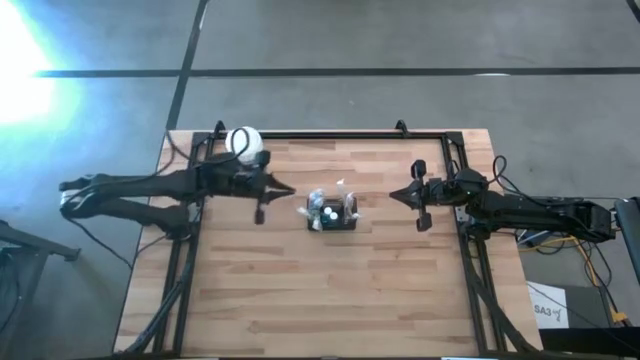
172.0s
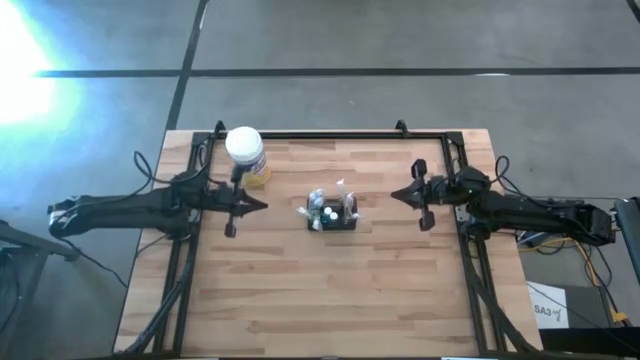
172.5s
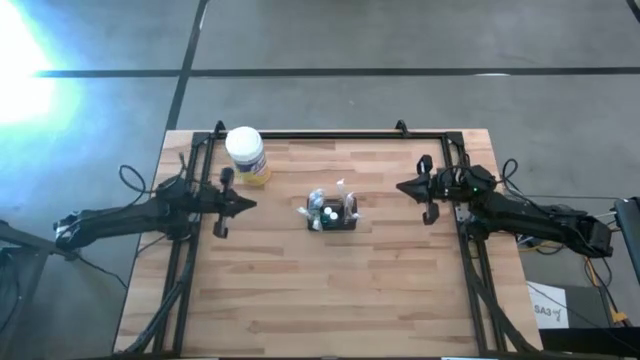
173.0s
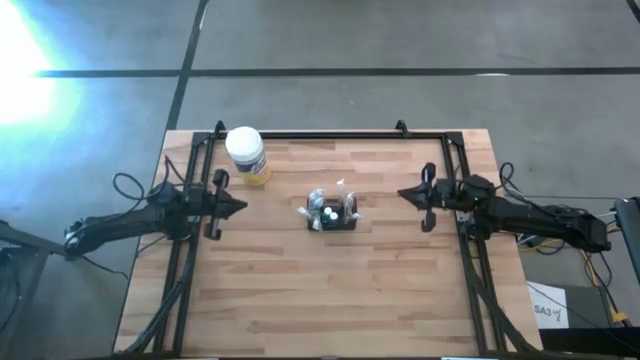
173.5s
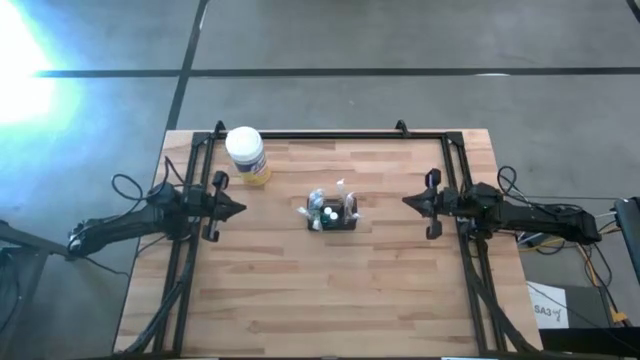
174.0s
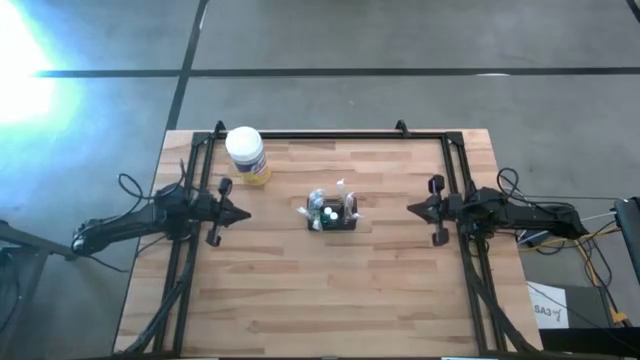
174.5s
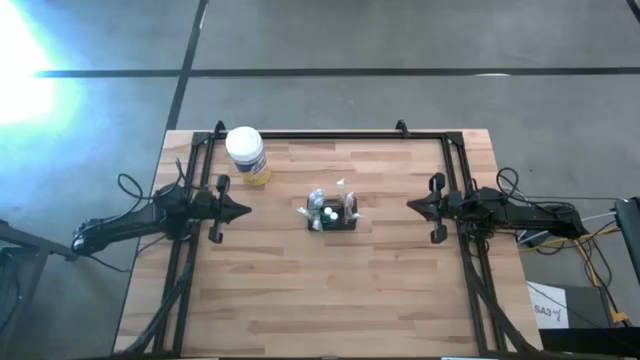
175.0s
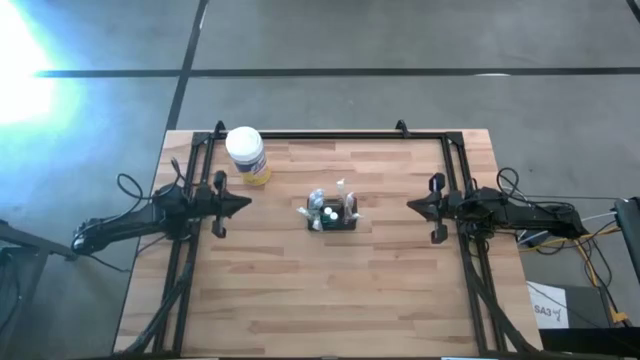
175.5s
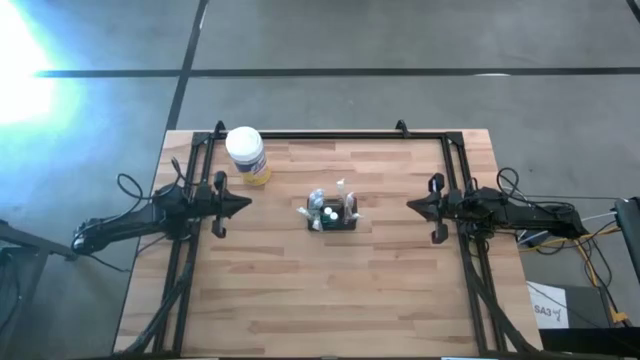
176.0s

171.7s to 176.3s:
Task: Pick & Place toothbrushing station
Return to Home Position

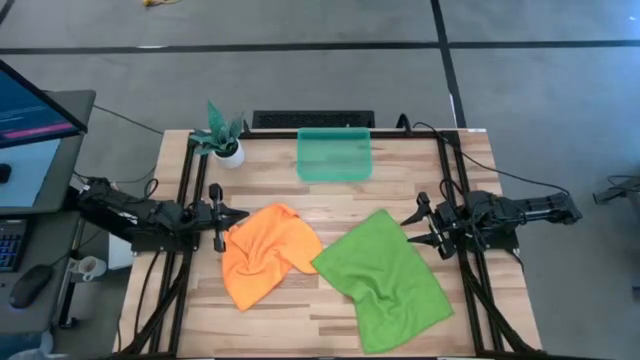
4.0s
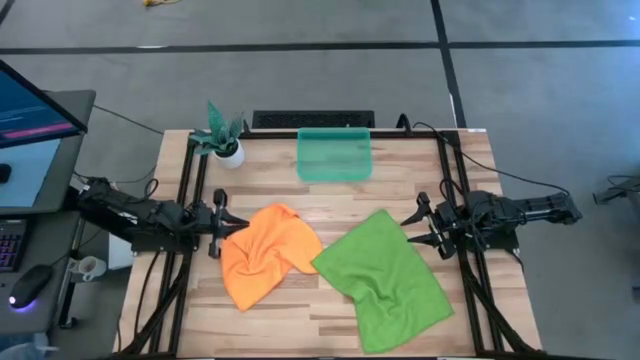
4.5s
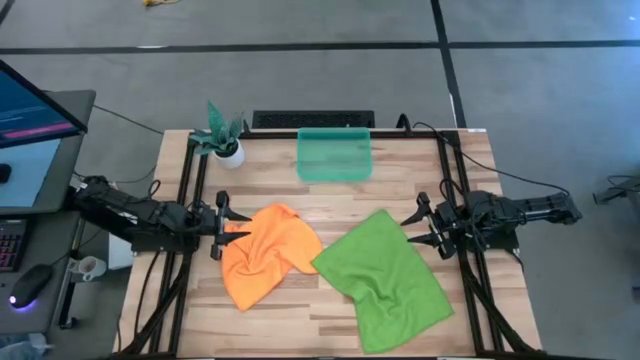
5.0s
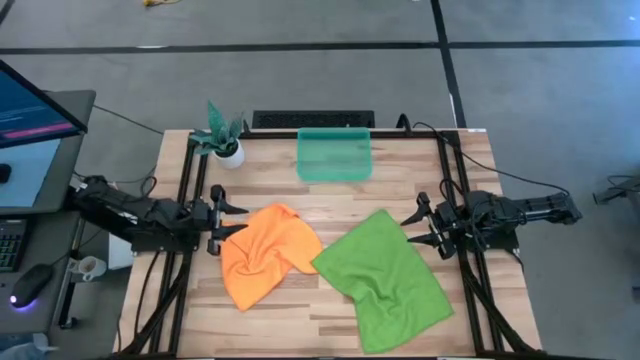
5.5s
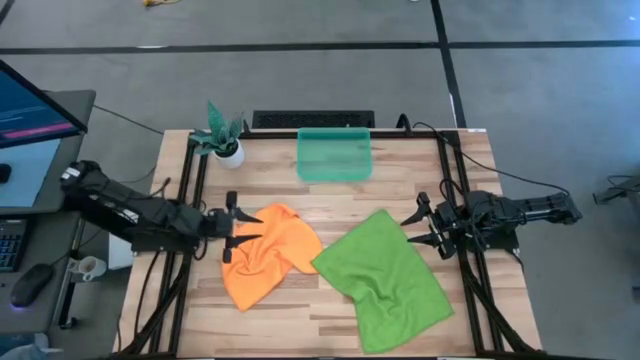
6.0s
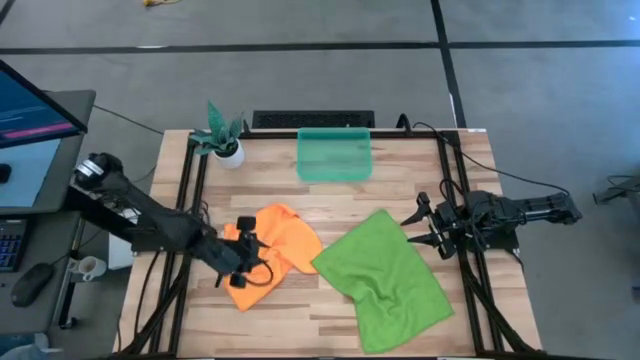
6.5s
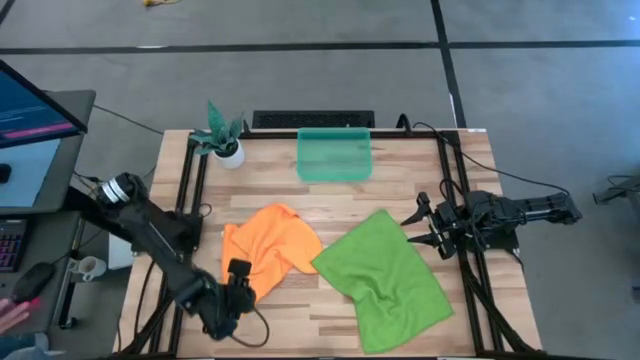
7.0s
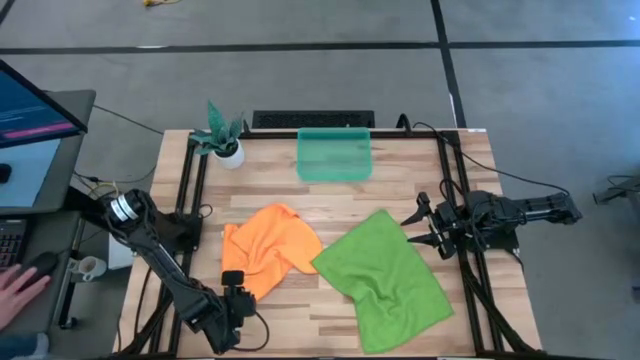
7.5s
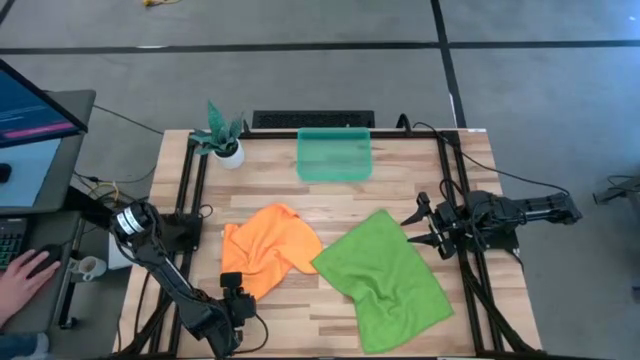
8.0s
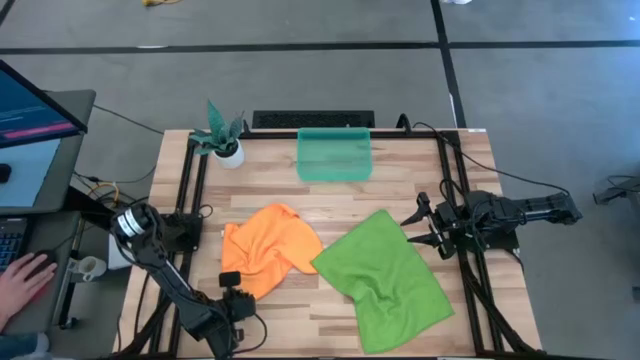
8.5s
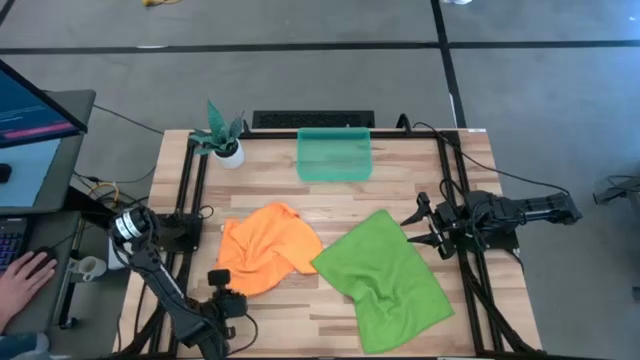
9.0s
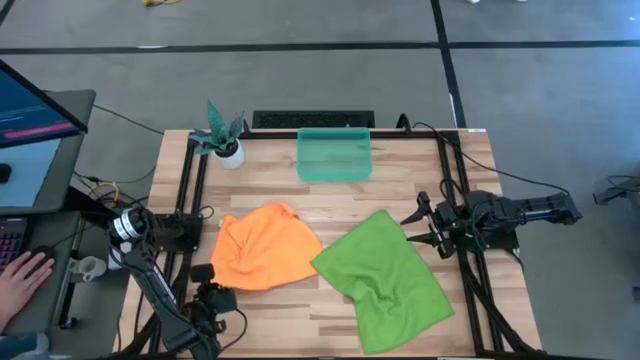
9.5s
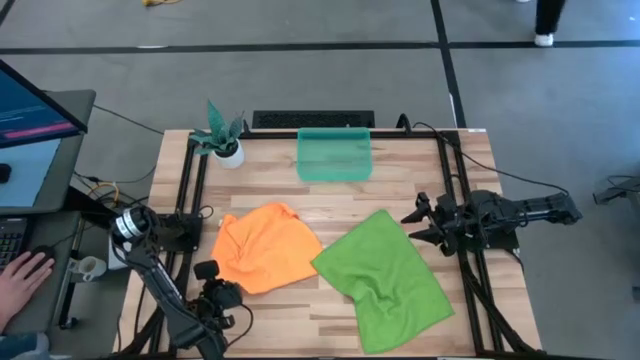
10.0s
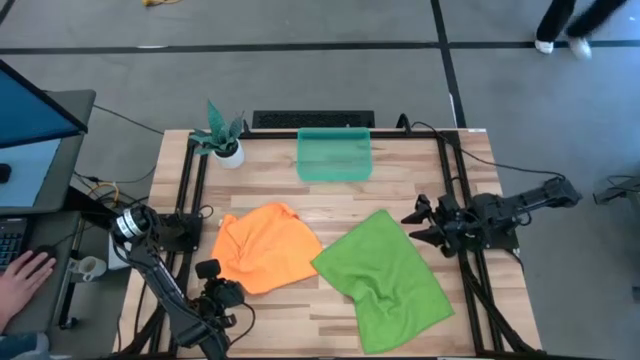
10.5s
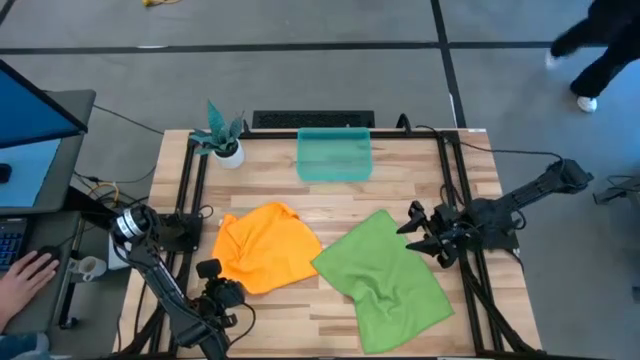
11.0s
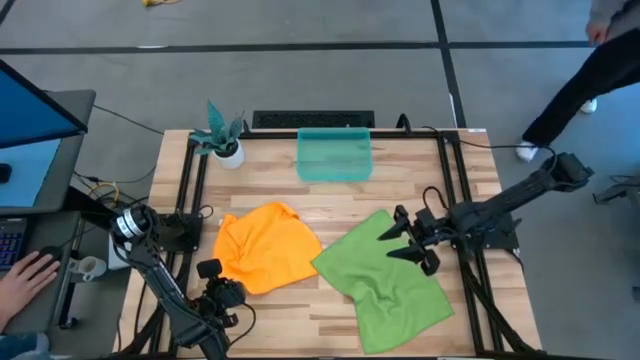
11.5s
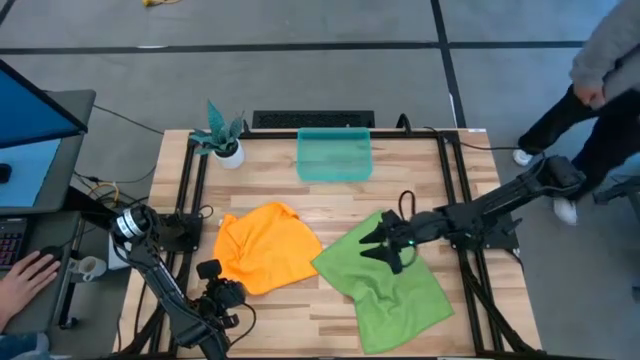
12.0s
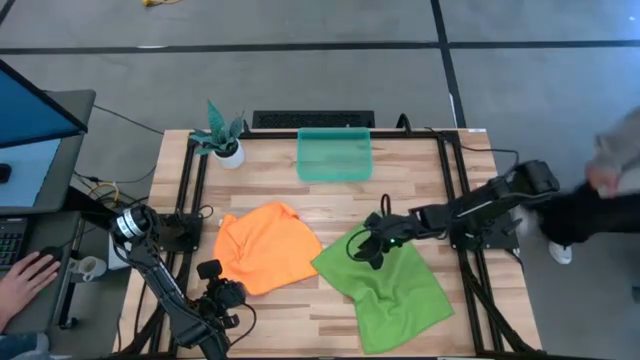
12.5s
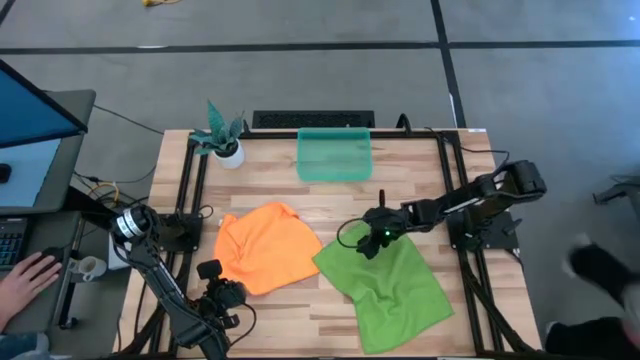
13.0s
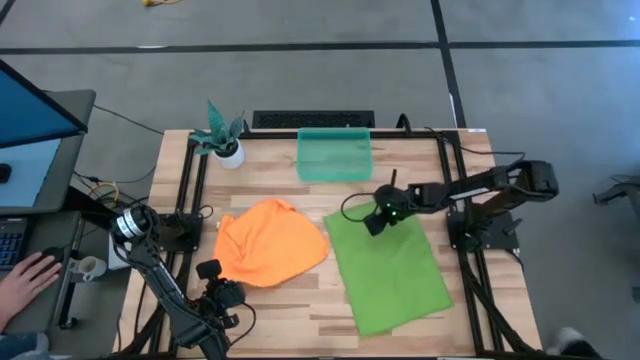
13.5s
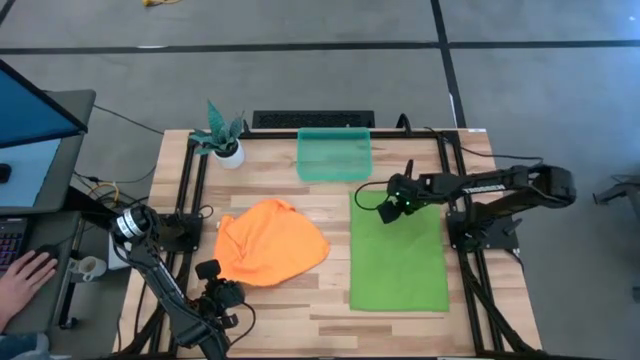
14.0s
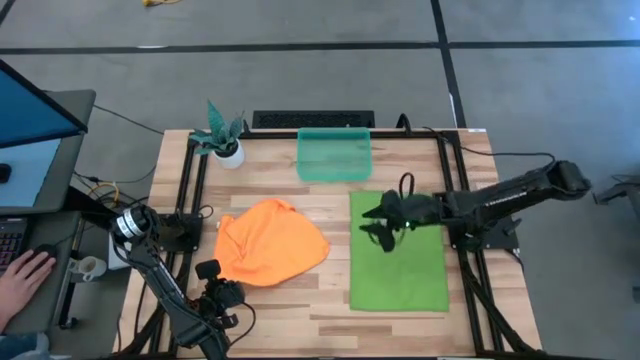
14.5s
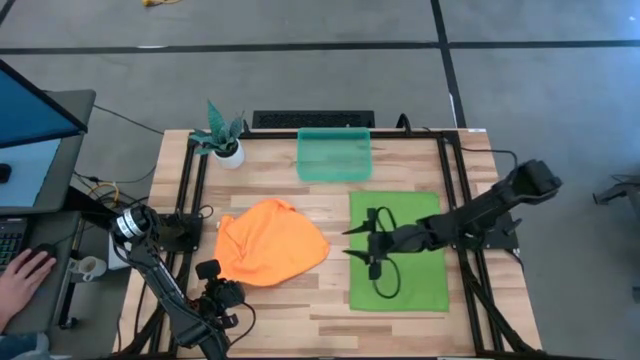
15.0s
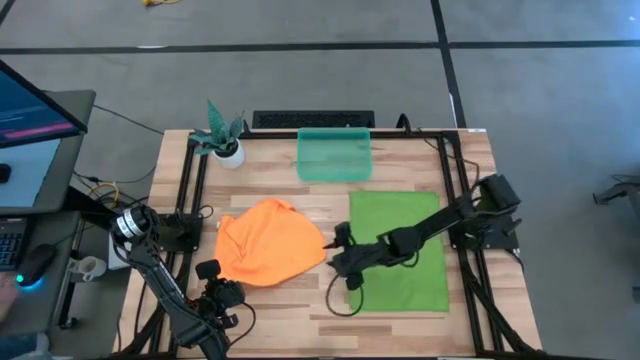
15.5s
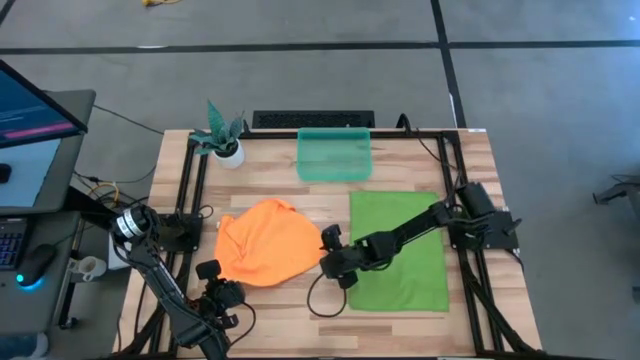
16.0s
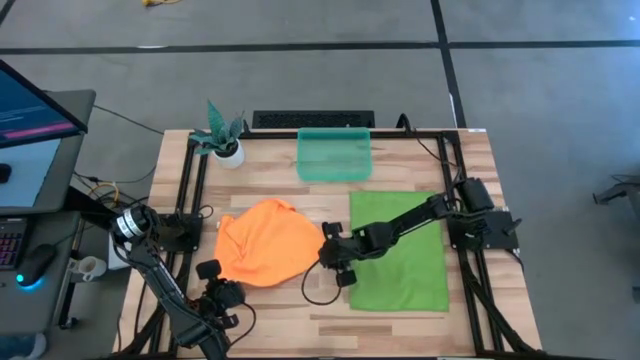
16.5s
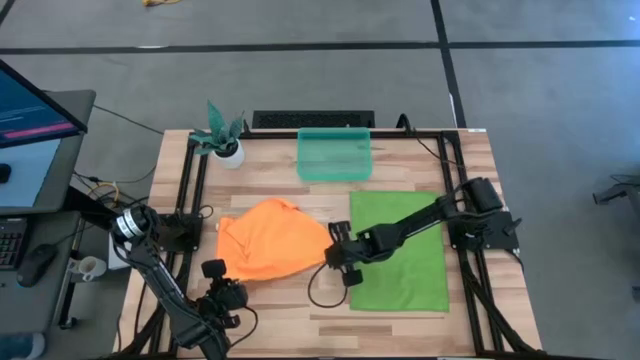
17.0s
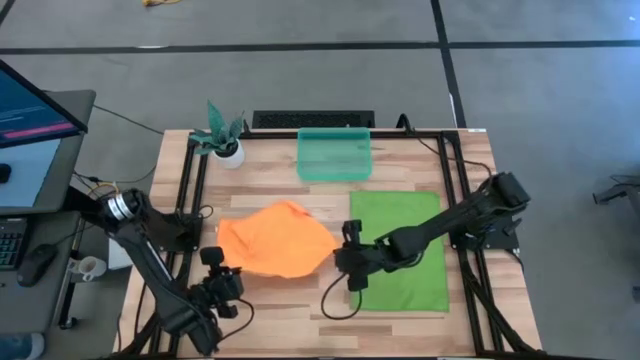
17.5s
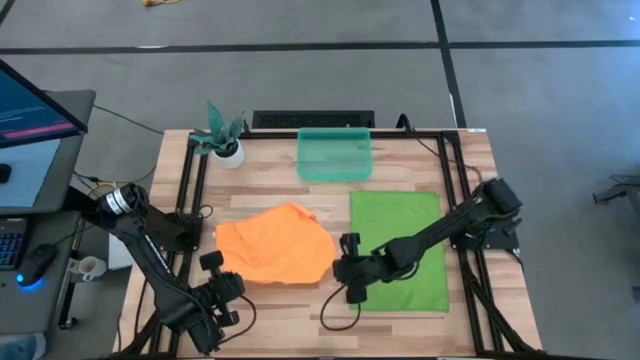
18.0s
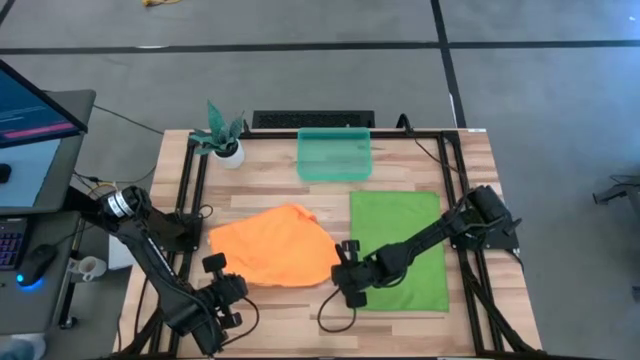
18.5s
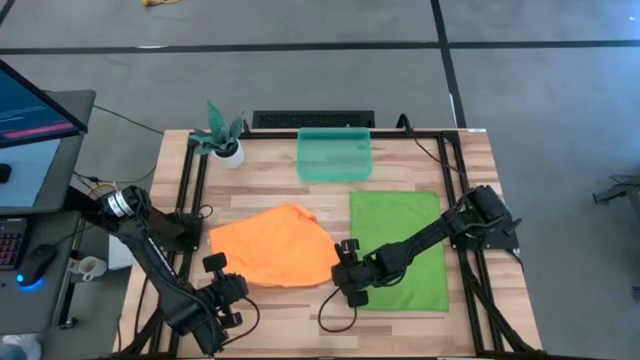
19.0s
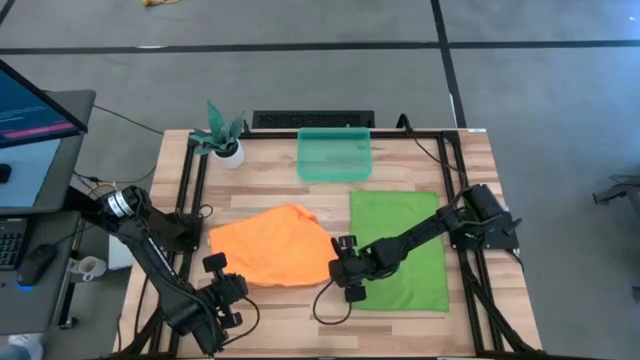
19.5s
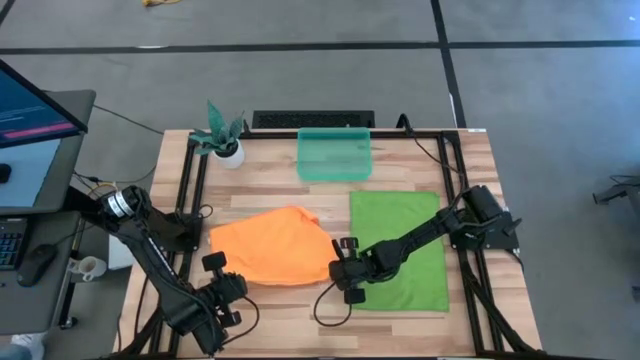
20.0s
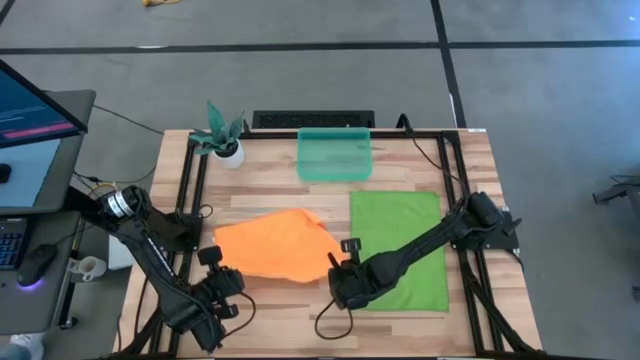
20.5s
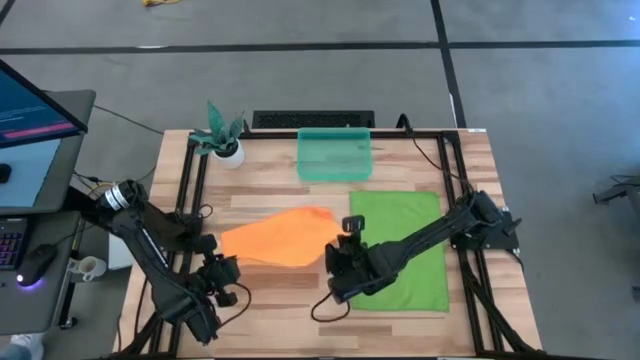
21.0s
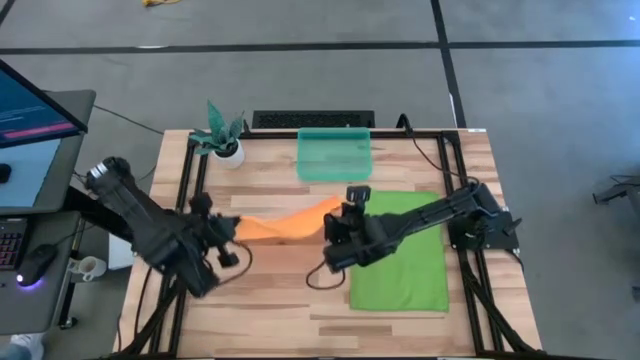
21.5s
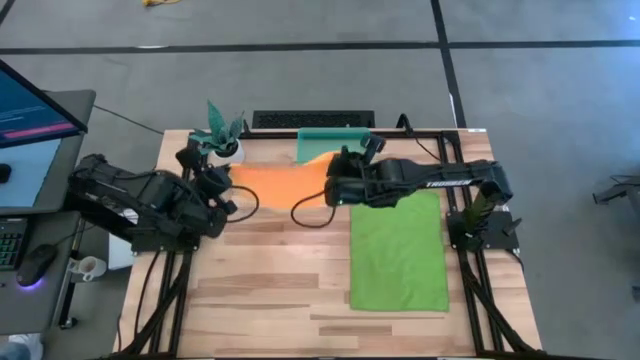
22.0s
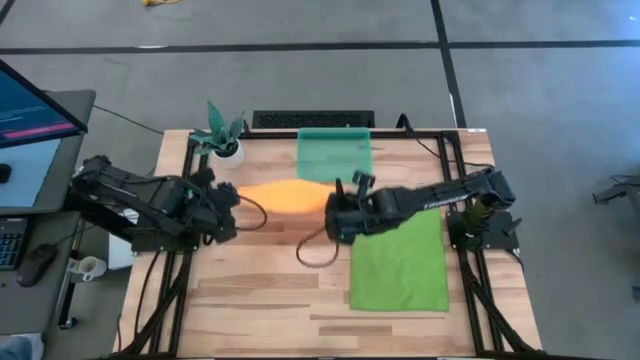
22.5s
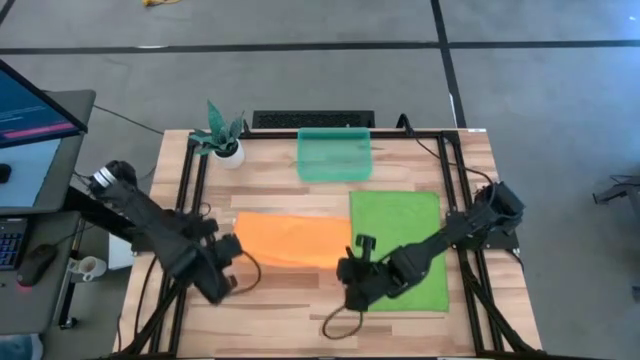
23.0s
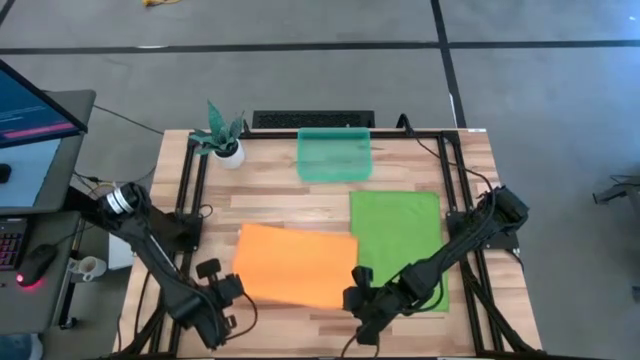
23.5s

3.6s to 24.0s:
Task: Roll microfiber towels into tight, uniform cylinder then place into a basket
Fold the orange towel
